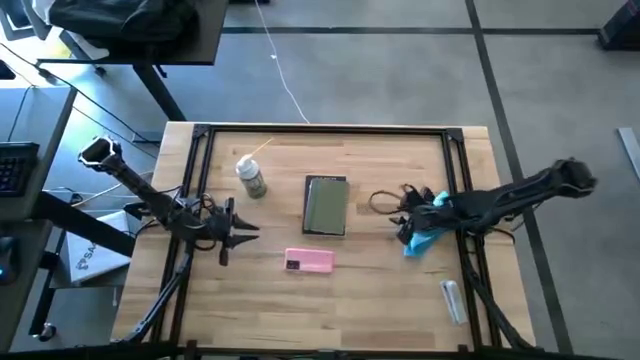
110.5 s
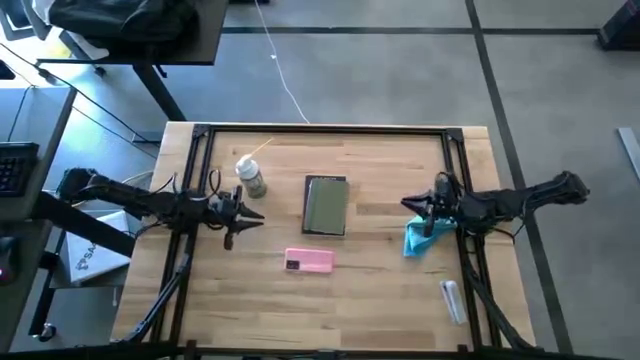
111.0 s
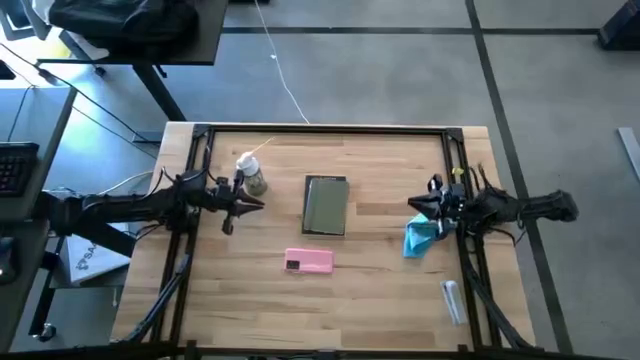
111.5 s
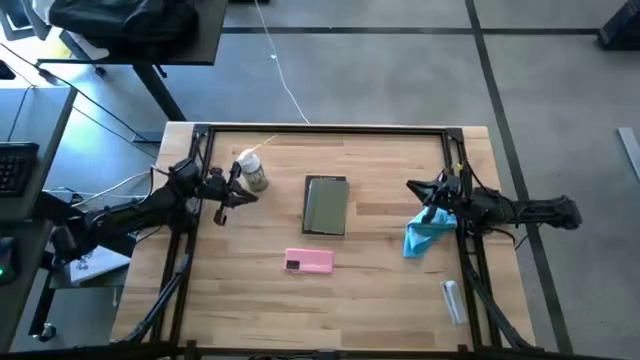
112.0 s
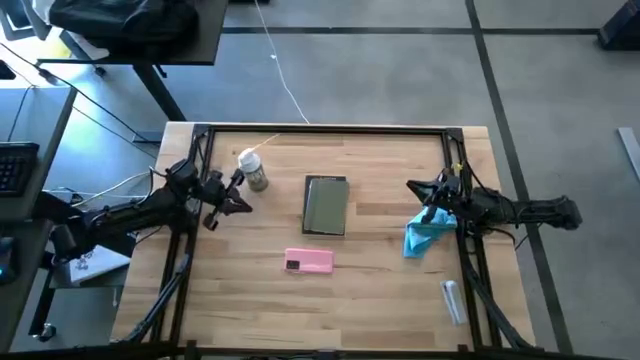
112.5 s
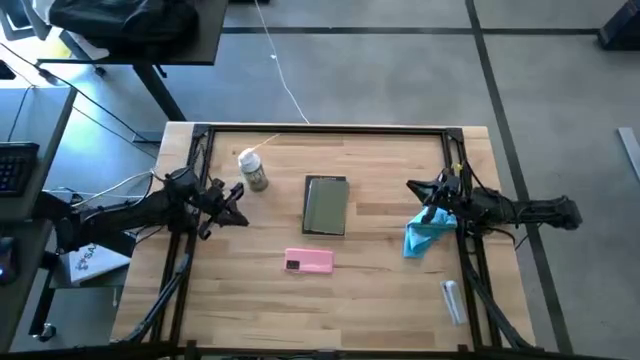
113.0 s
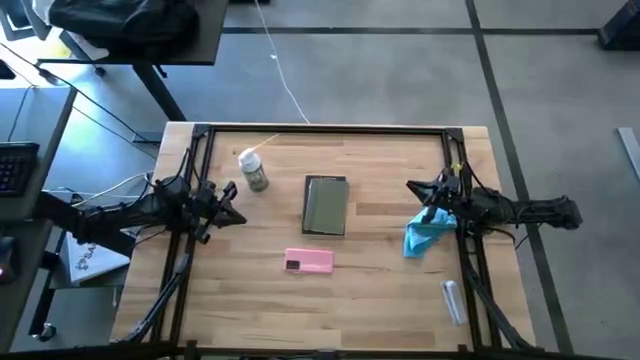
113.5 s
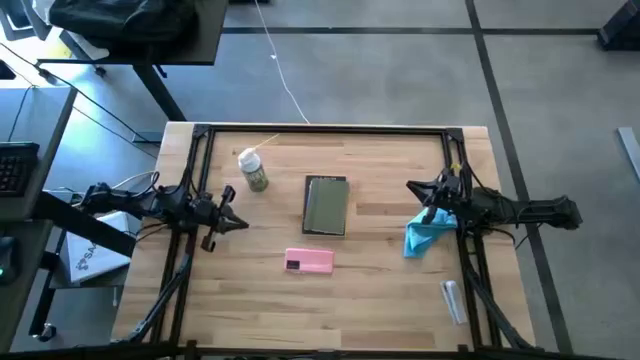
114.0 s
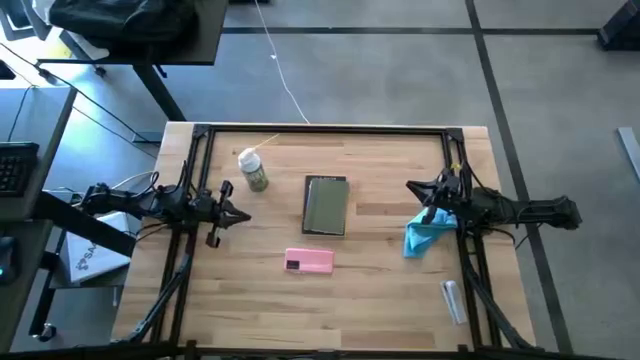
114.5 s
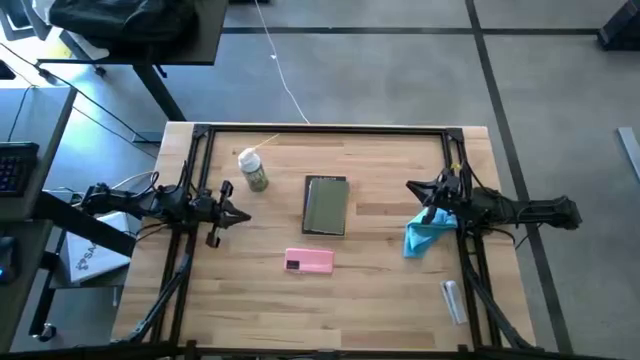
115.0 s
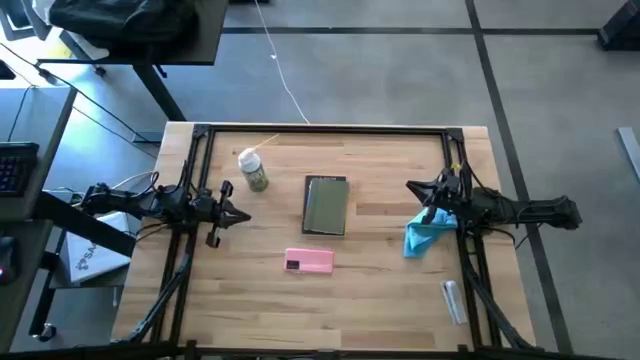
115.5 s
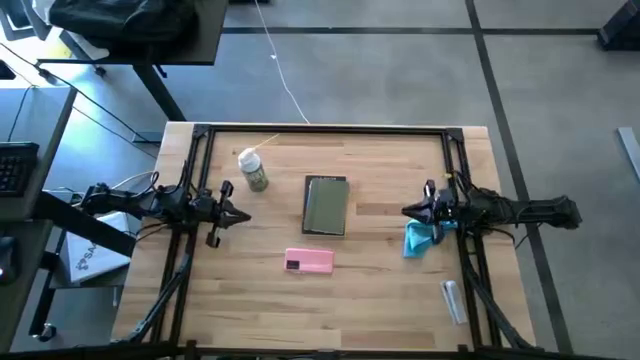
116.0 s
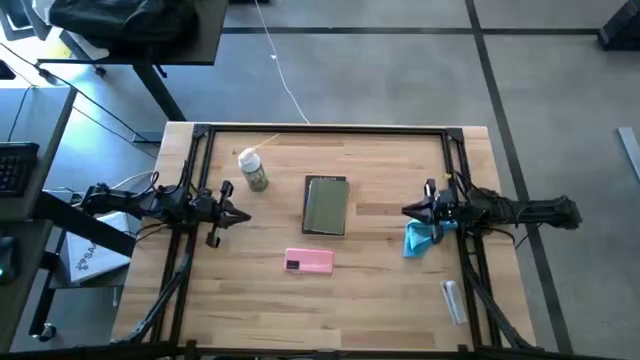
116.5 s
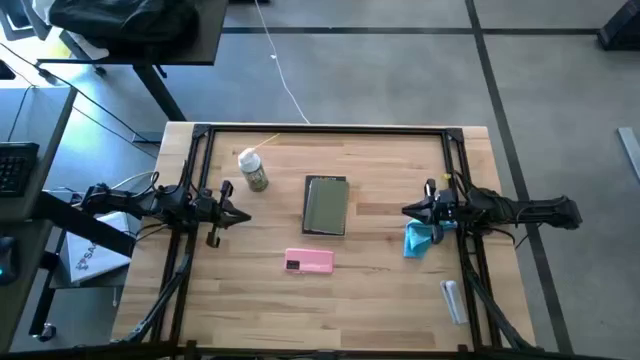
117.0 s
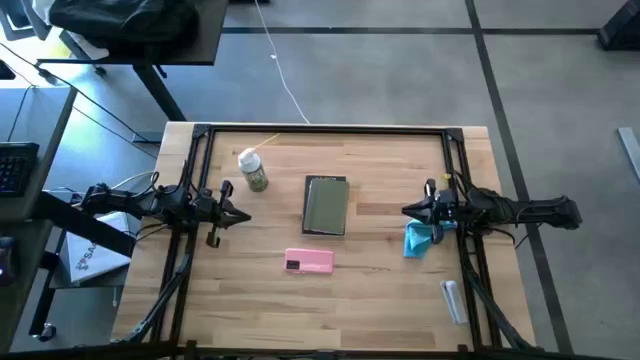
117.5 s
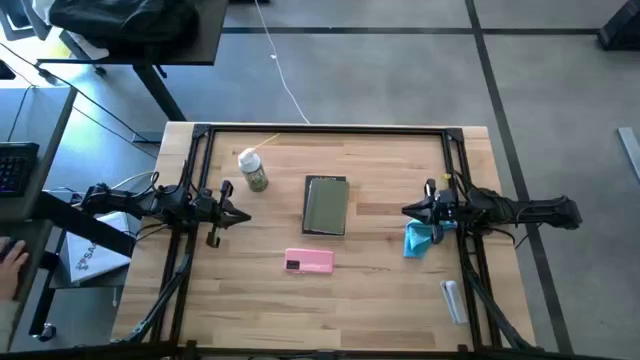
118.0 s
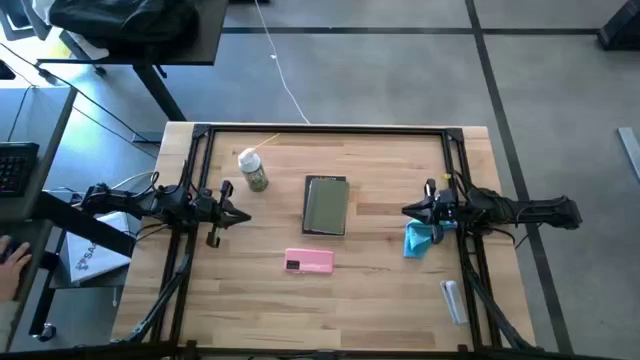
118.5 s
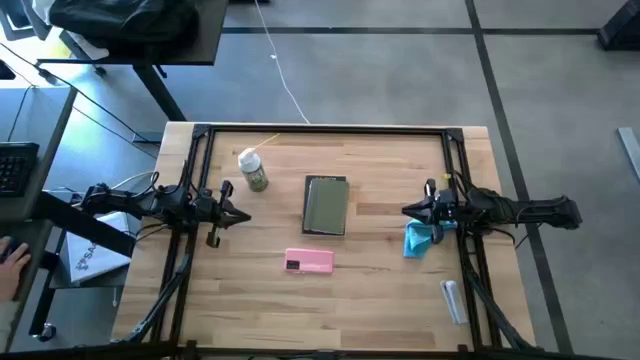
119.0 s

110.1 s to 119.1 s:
Task: Apply microfiber cloth
Return to Home Position

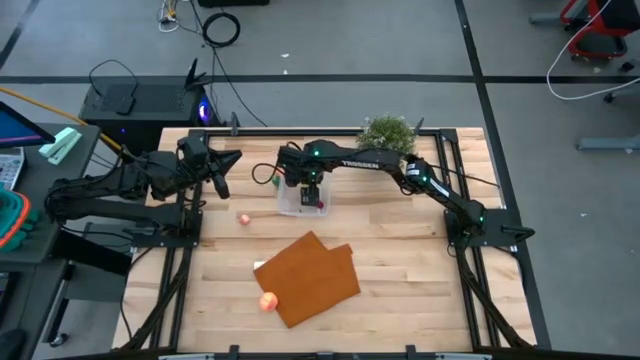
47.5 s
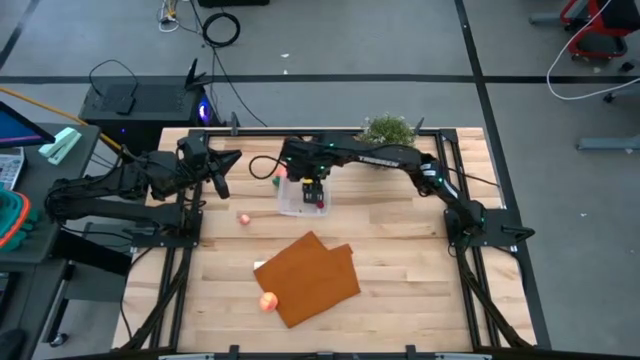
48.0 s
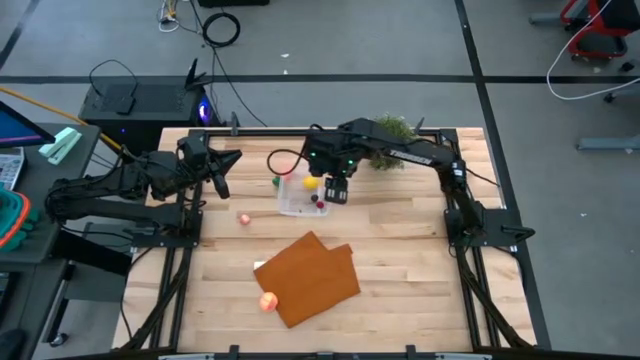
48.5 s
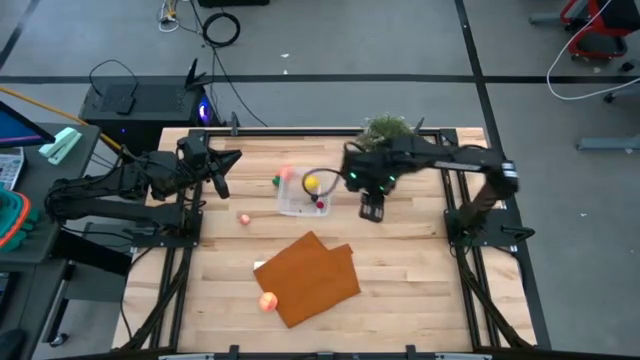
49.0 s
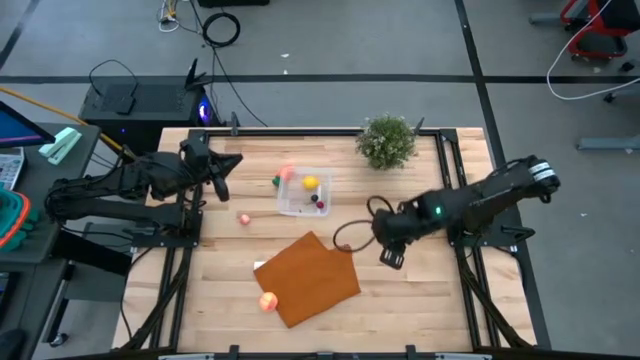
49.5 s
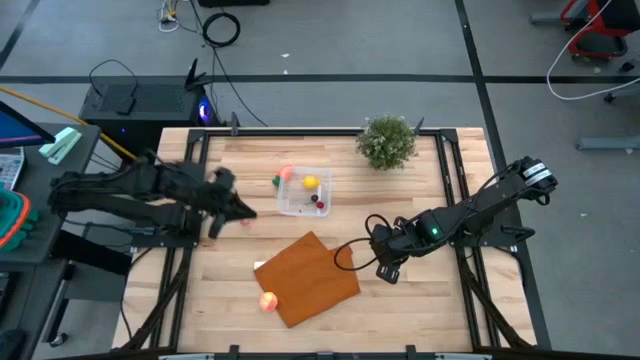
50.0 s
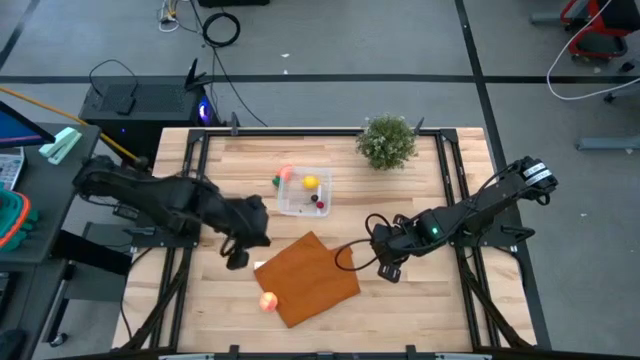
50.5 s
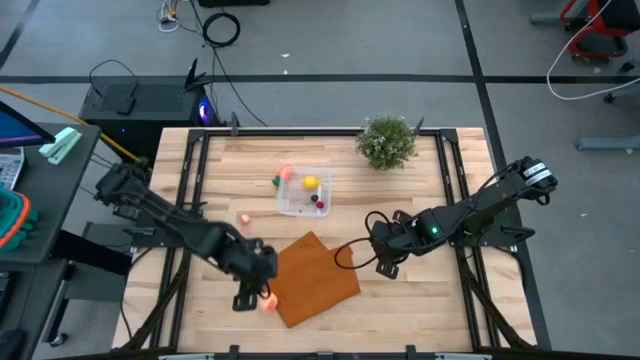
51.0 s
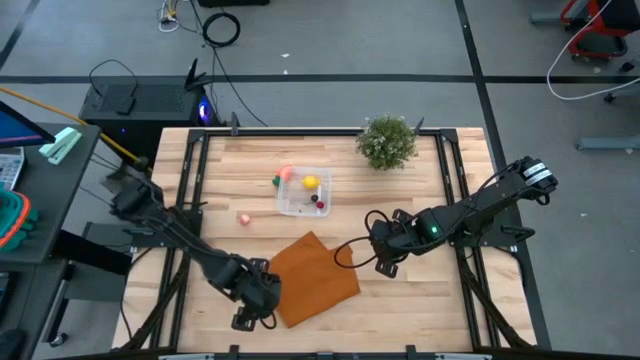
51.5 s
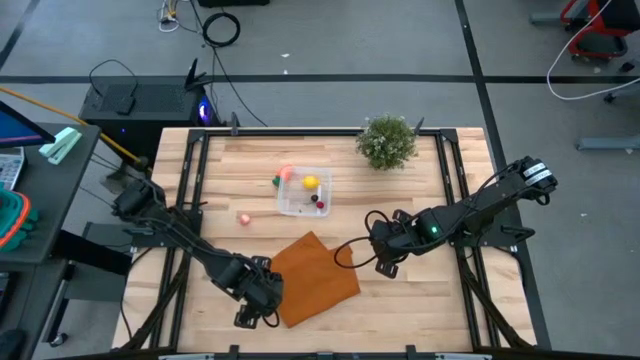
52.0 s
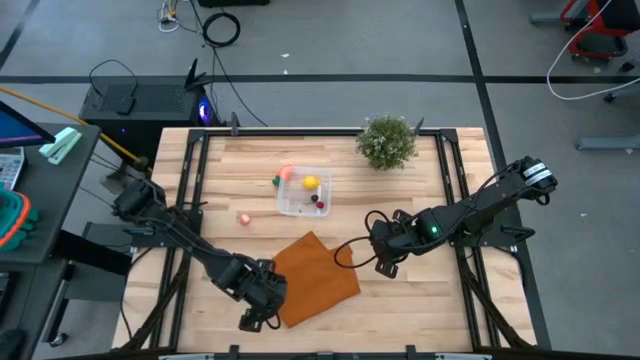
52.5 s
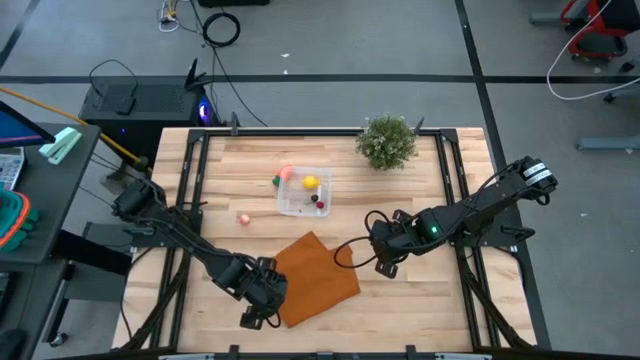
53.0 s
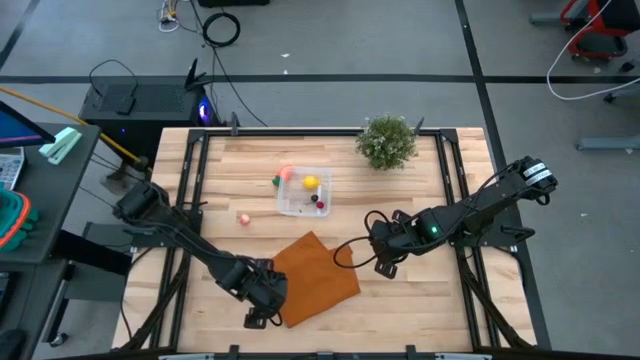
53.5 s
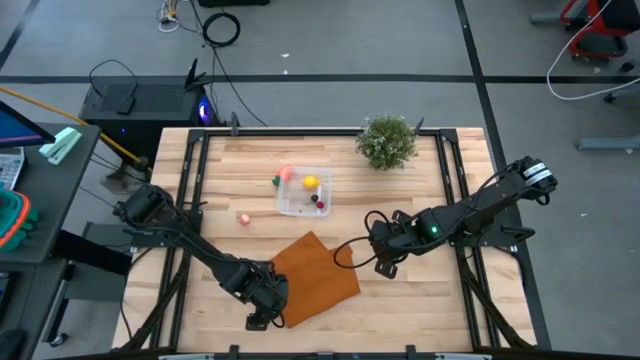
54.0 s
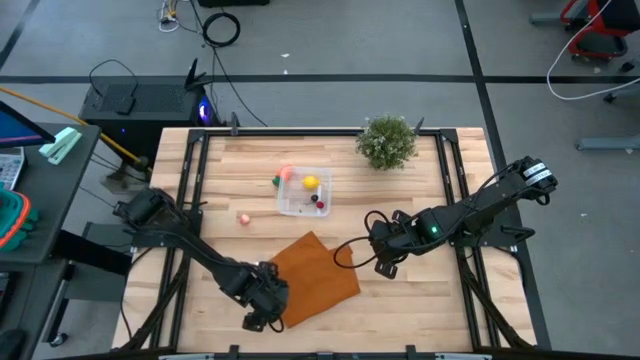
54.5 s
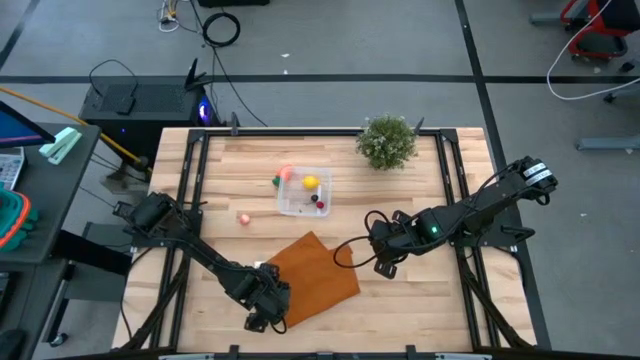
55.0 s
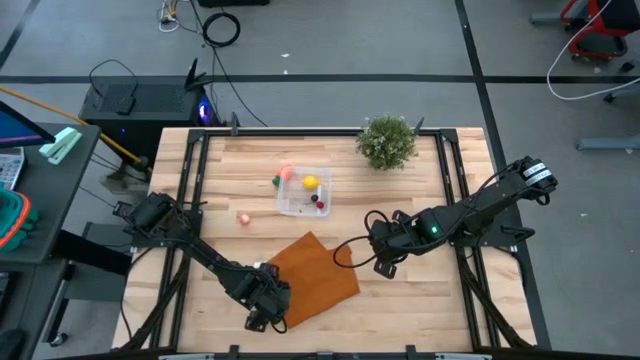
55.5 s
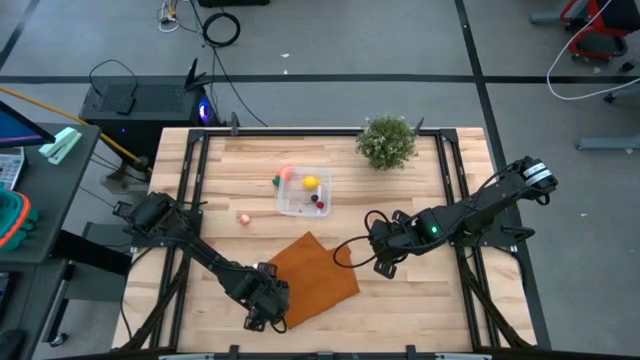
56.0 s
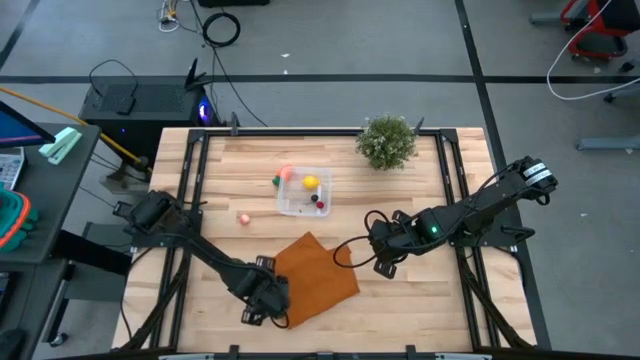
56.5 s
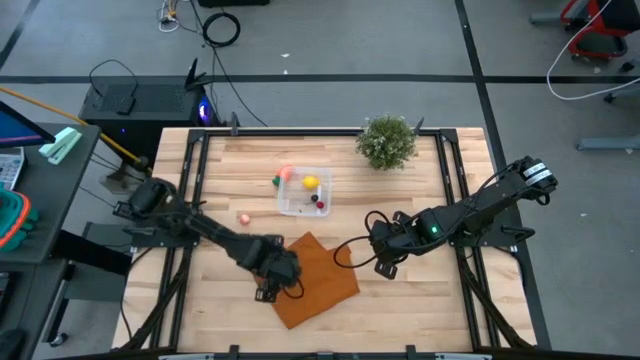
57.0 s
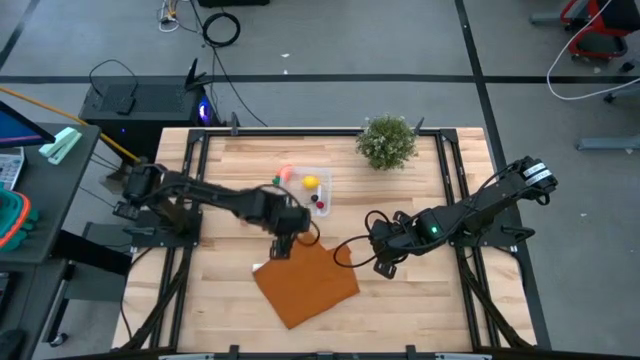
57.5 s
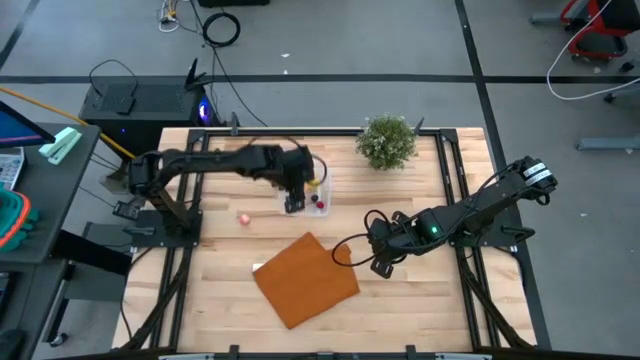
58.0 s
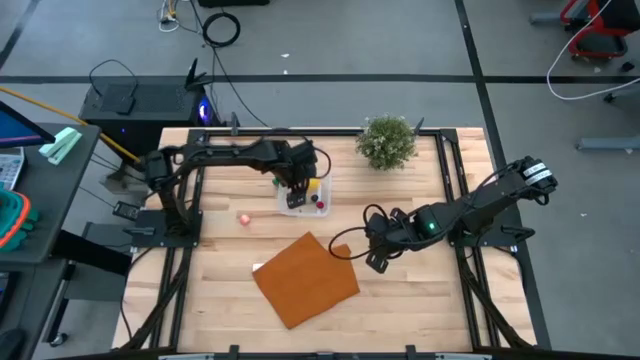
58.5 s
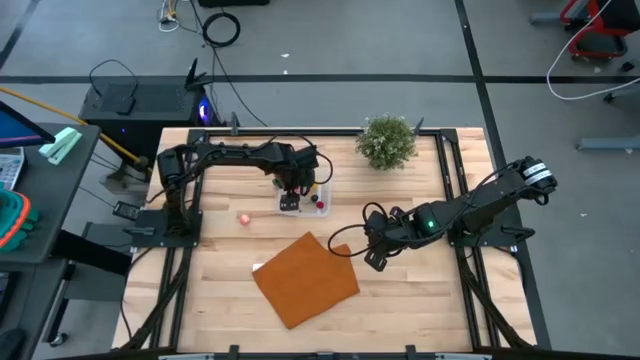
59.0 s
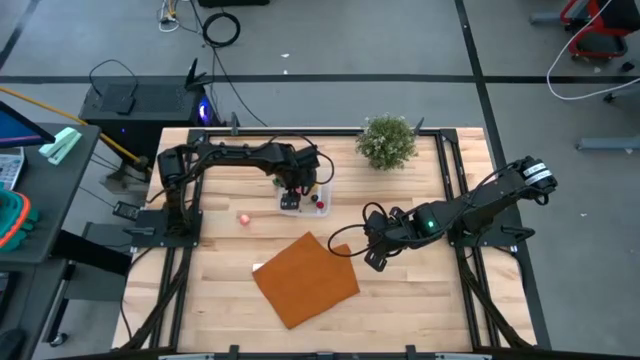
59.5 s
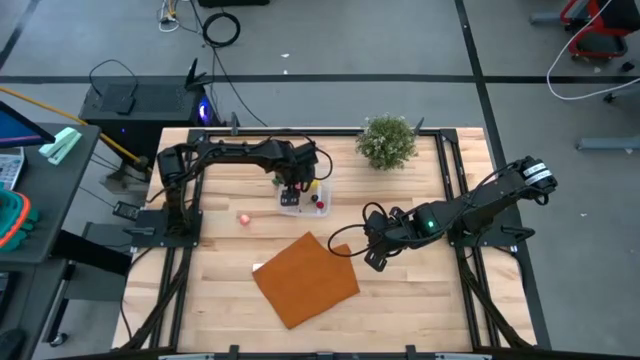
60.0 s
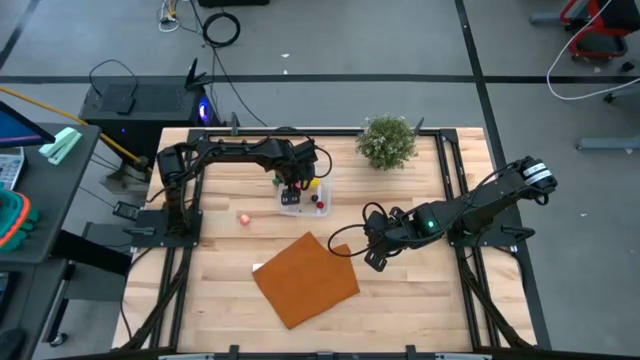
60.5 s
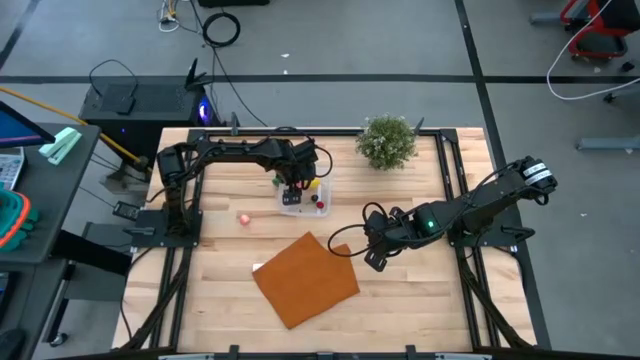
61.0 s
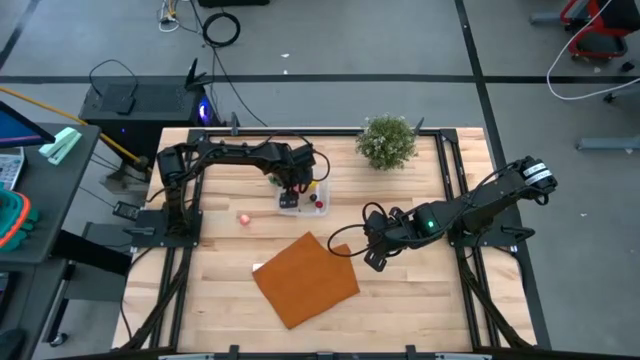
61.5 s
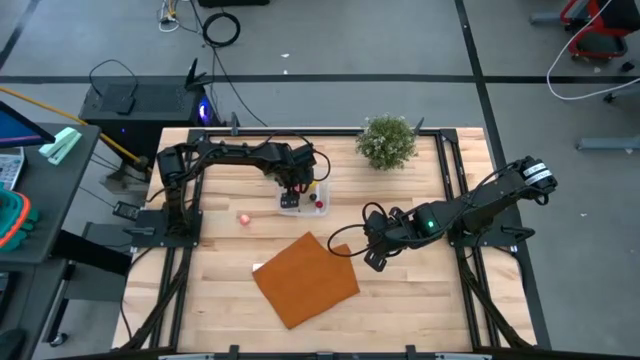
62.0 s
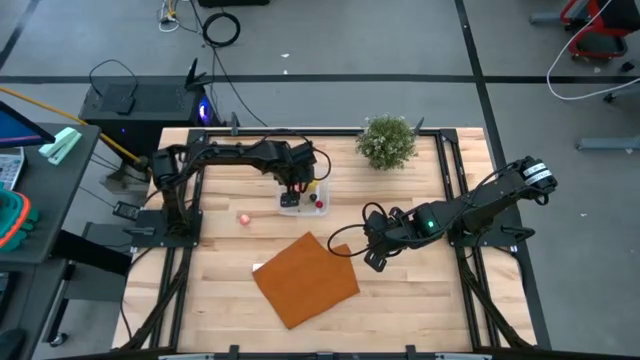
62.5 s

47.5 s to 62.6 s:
Task: Pick and placing Produce into tupperware
Put the bottom pink peach into the transparent bin
